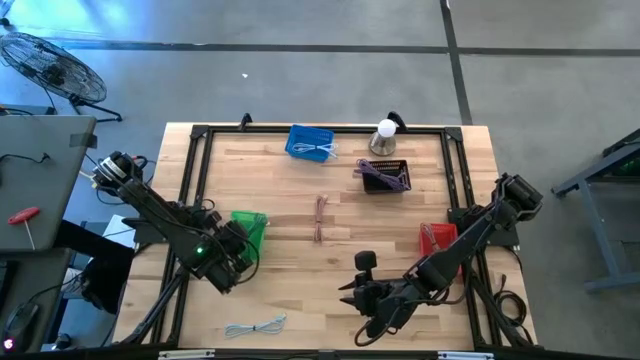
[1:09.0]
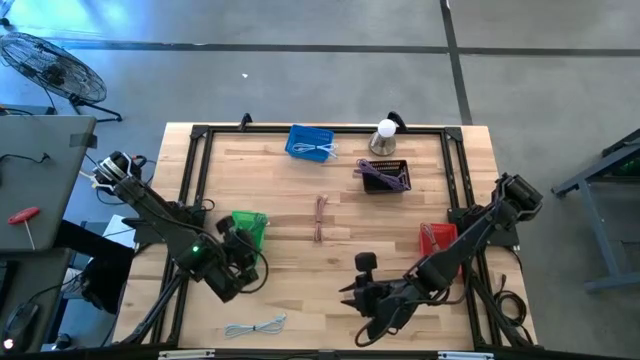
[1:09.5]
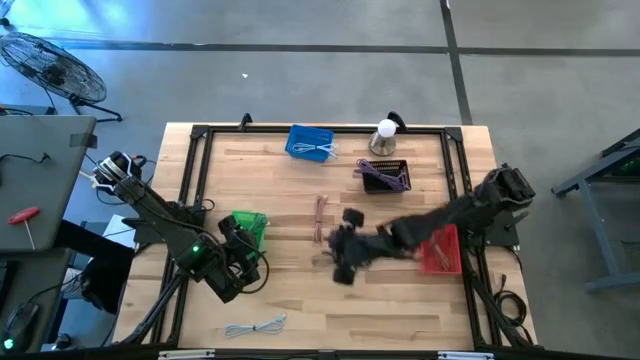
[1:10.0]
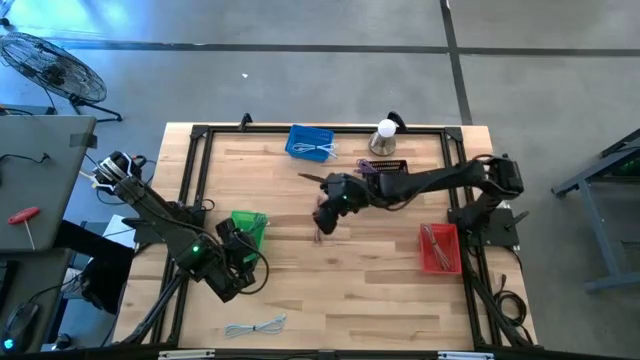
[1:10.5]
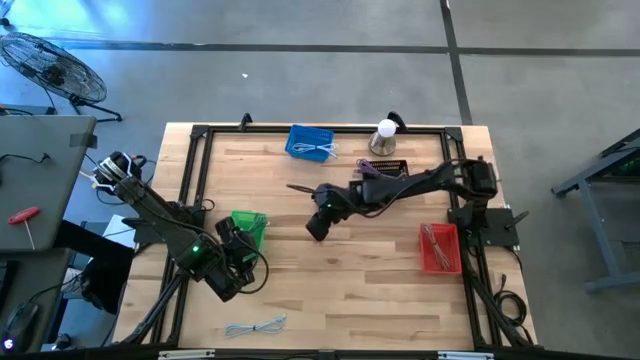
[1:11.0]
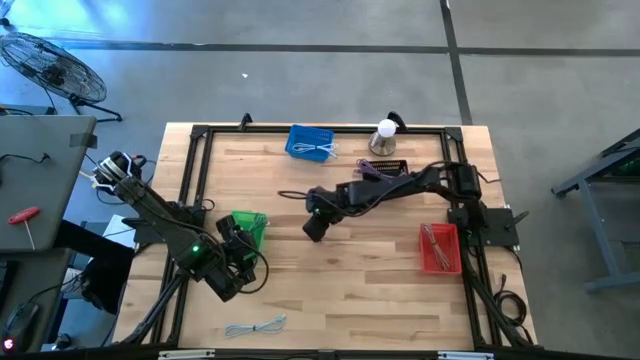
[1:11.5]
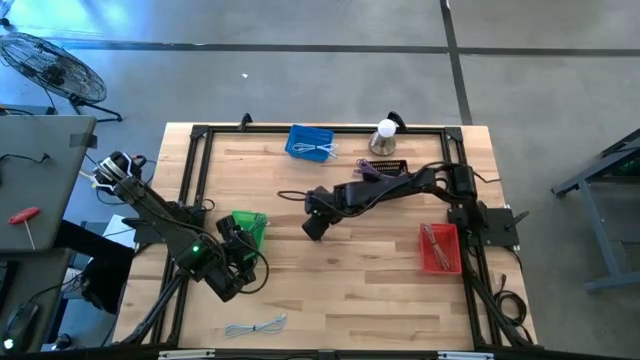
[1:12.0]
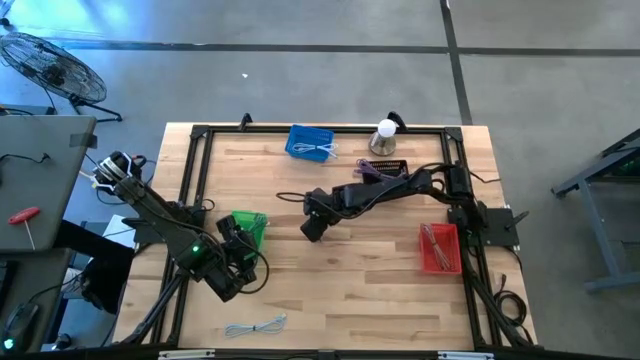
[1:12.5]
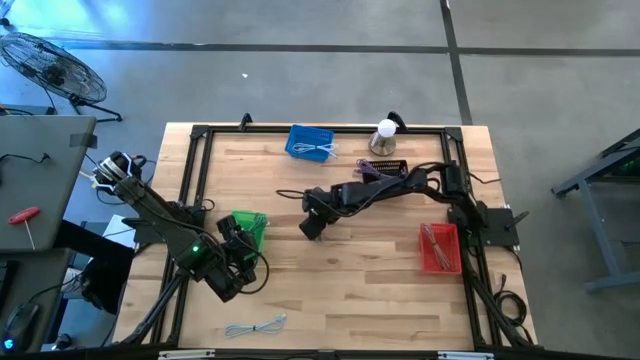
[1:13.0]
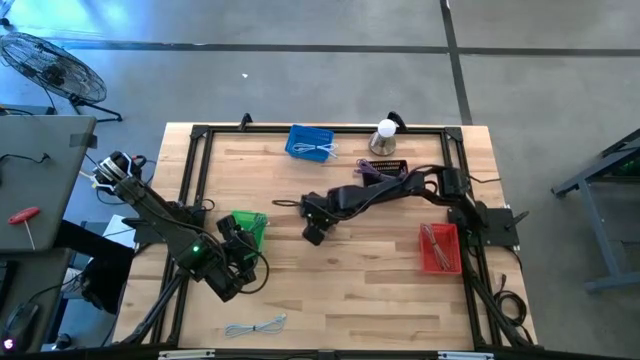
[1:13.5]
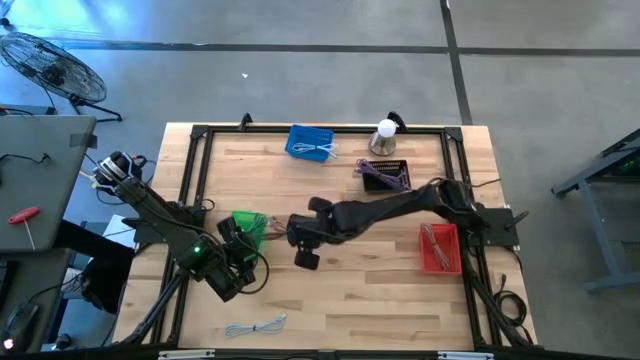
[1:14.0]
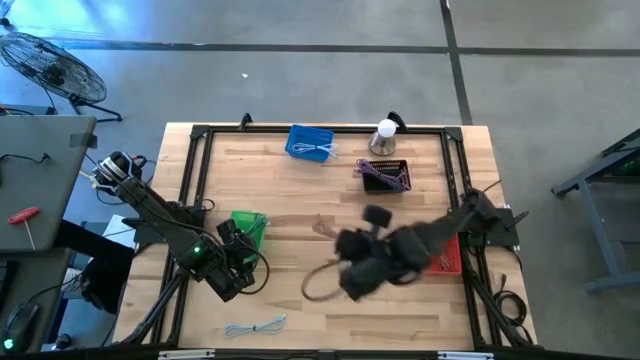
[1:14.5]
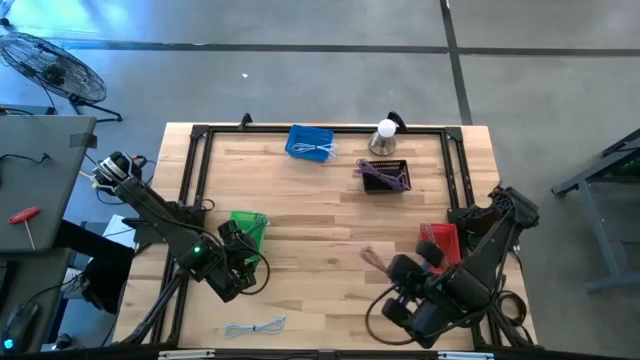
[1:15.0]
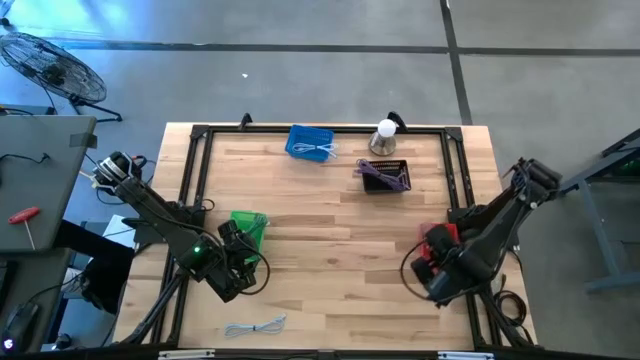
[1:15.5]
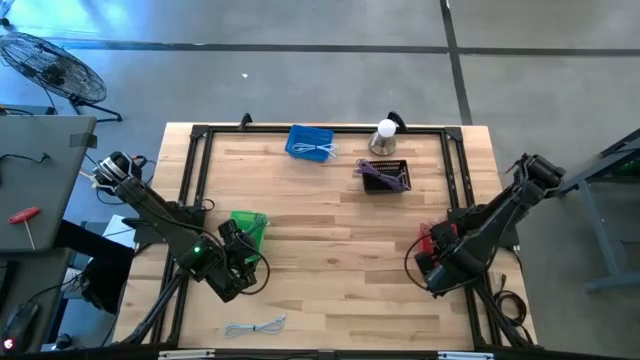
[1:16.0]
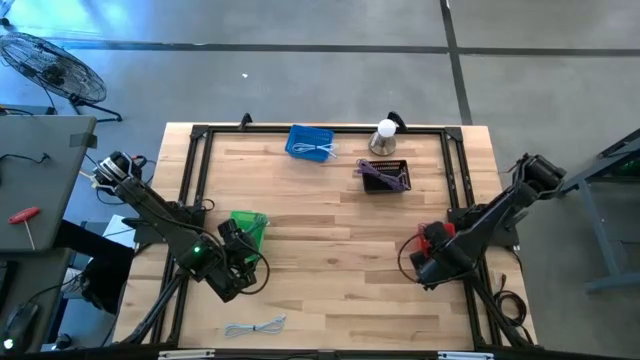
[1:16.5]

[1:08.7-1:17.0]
Task: Pick & Place USB Port
Put the pink charger cable into the red bin

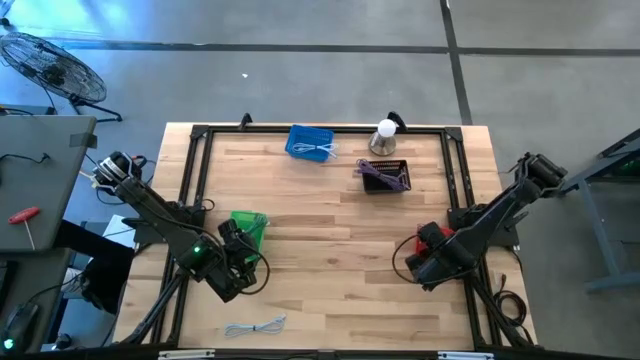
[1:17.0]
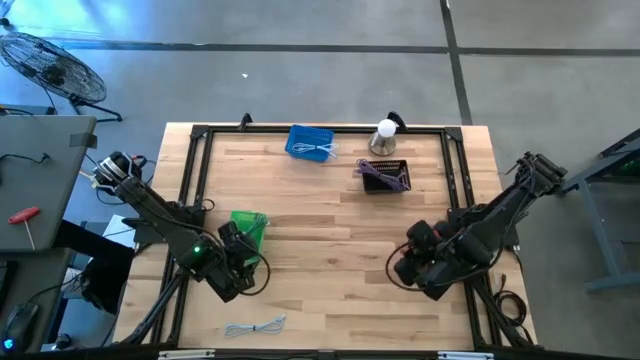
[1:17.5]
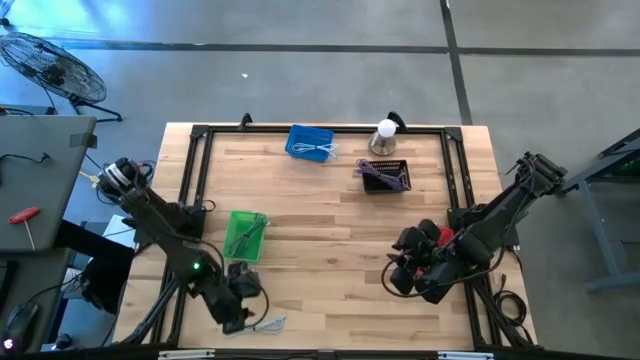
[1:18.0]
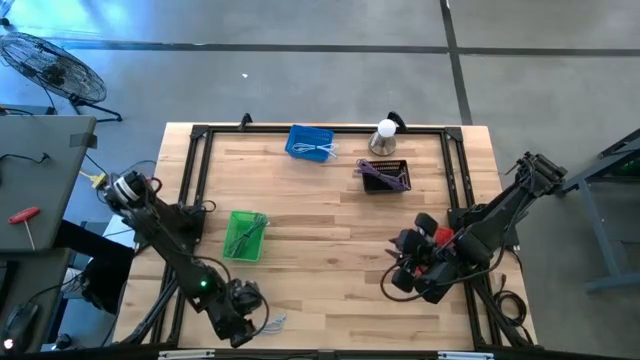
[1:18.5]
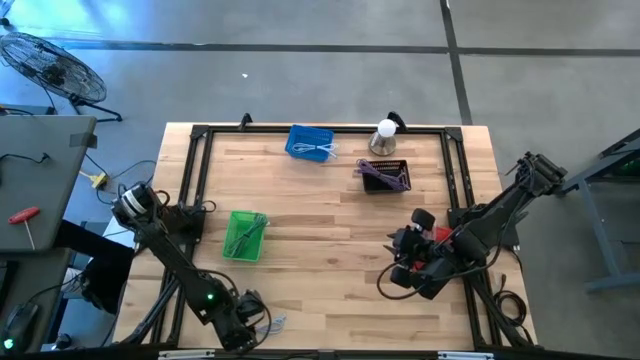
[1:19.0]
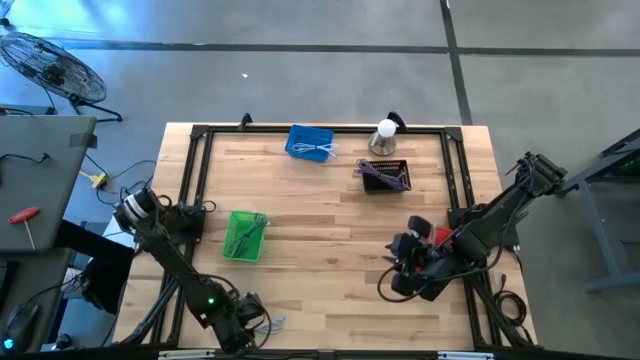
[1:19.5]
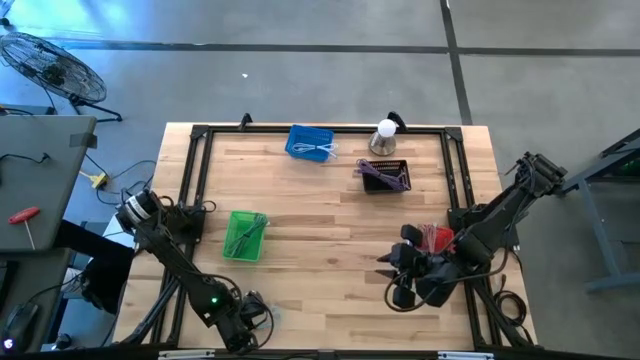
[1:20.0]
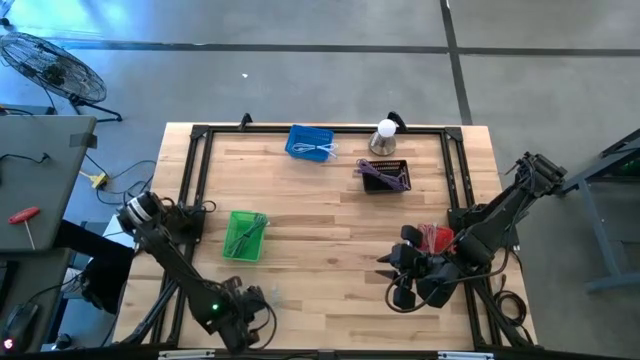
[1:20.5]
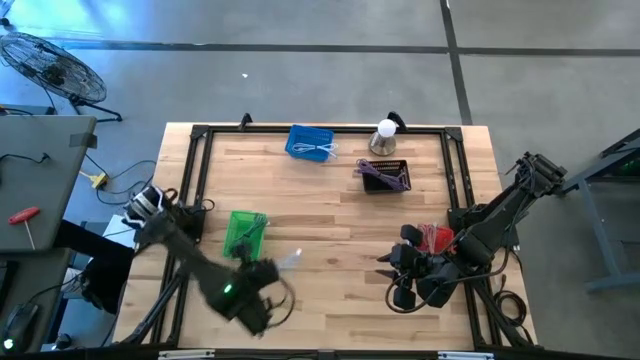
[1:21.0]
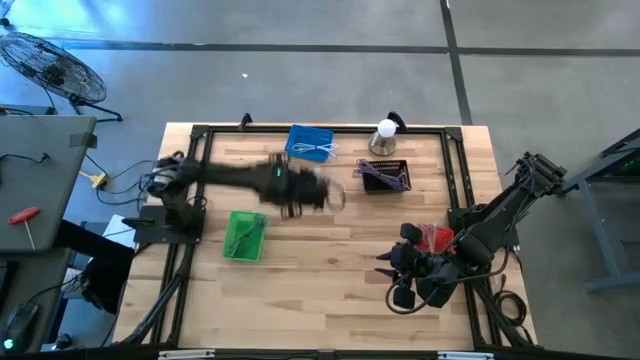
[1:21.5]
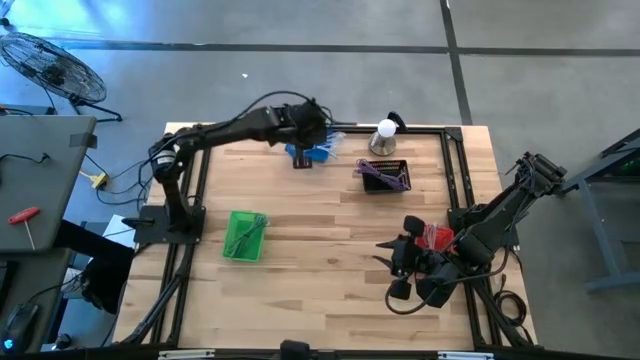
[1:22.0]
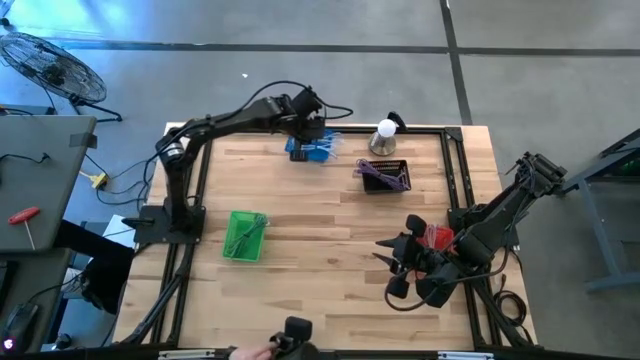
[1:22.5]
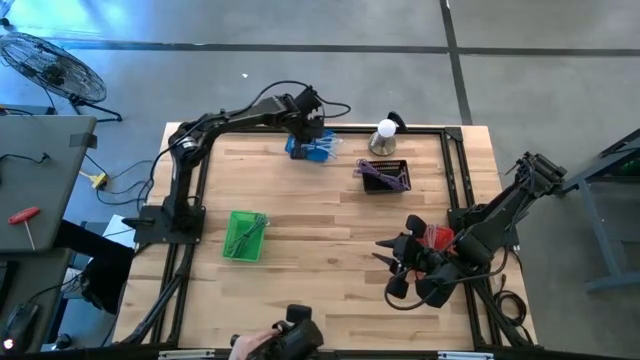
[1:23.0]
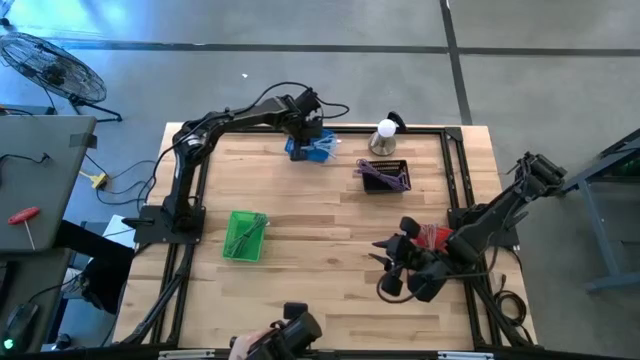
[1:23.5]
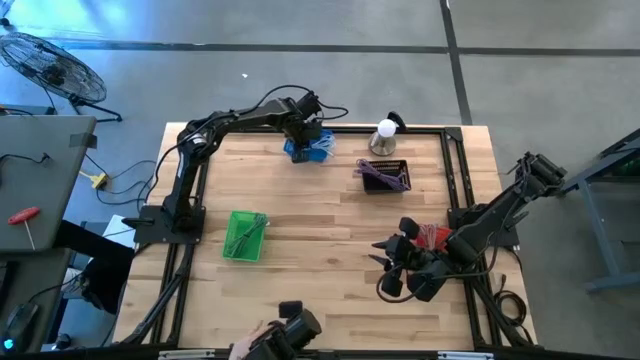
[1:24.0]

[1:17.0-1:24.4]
Put the light blue charger cable into the blue bin

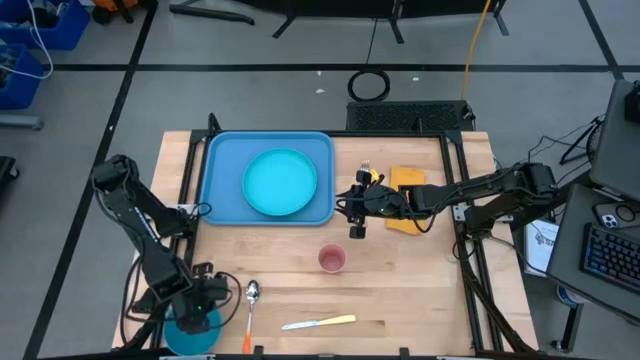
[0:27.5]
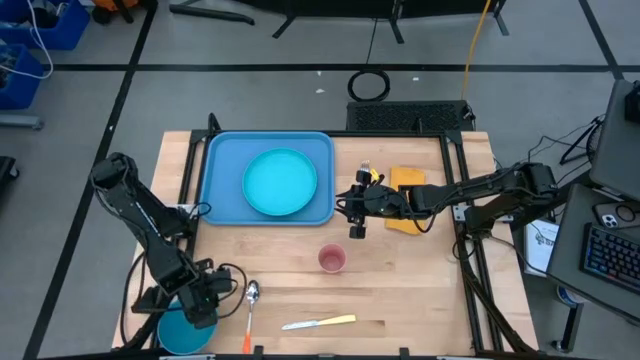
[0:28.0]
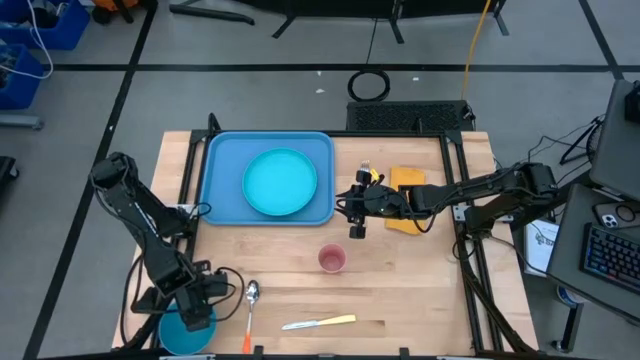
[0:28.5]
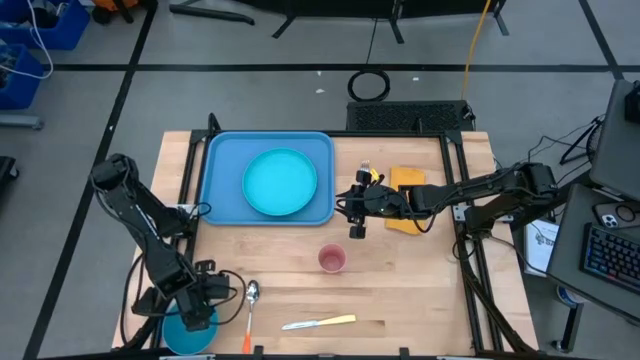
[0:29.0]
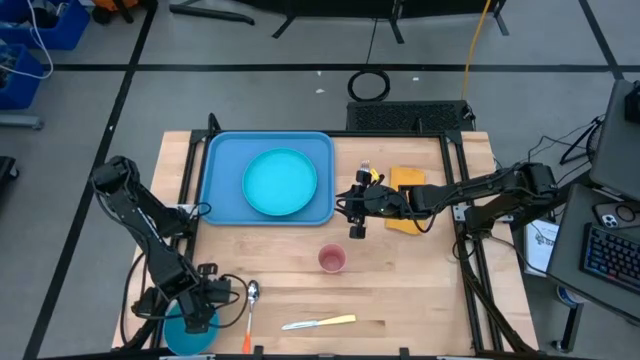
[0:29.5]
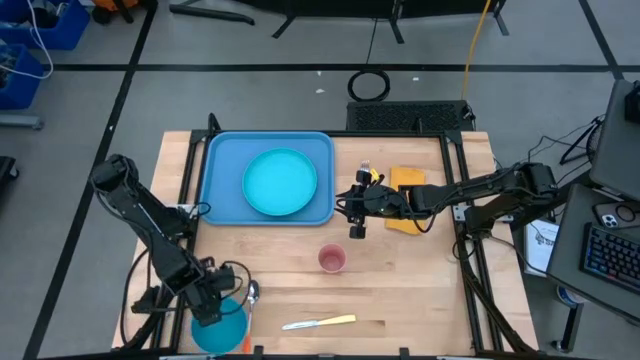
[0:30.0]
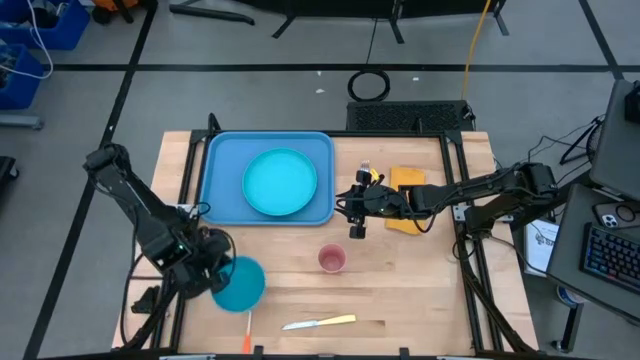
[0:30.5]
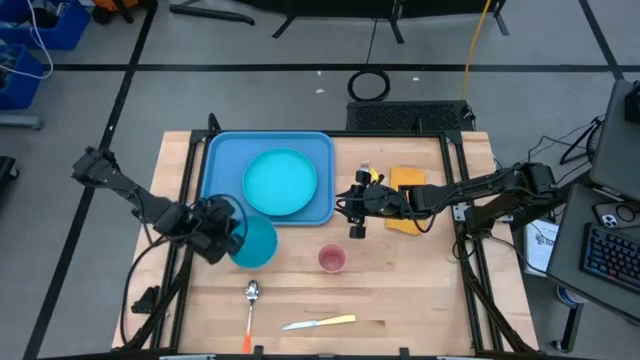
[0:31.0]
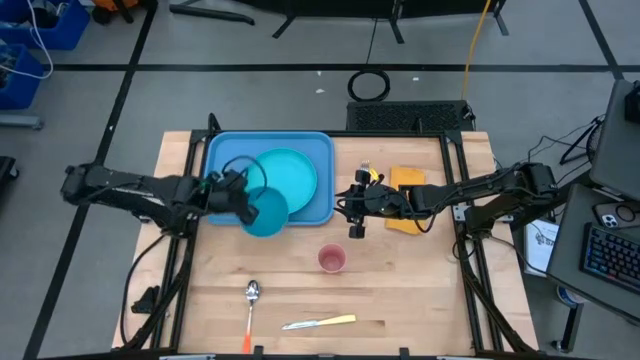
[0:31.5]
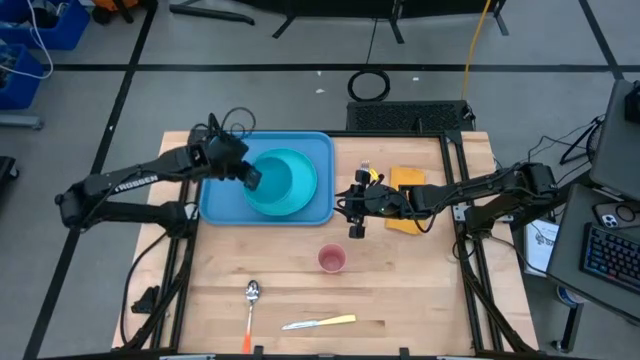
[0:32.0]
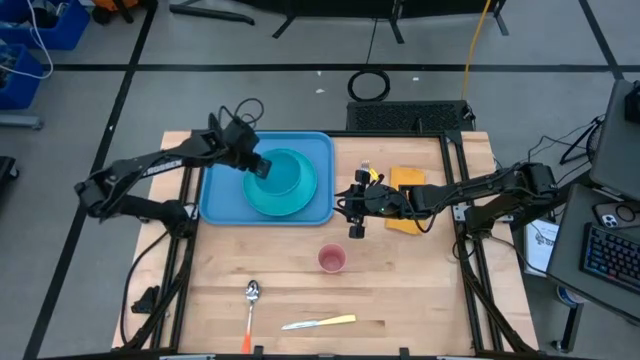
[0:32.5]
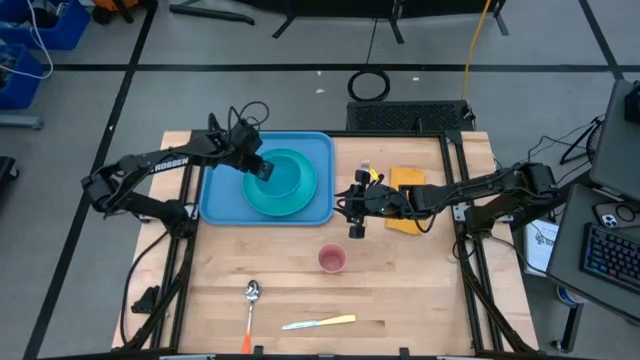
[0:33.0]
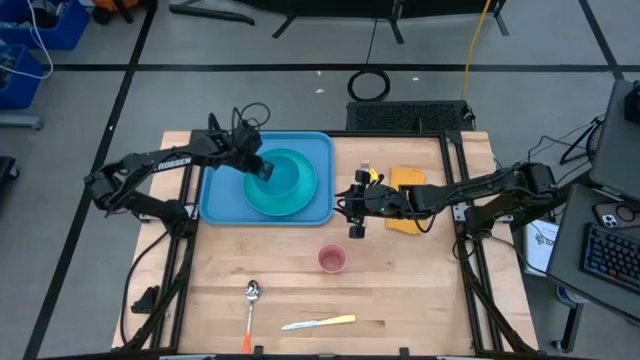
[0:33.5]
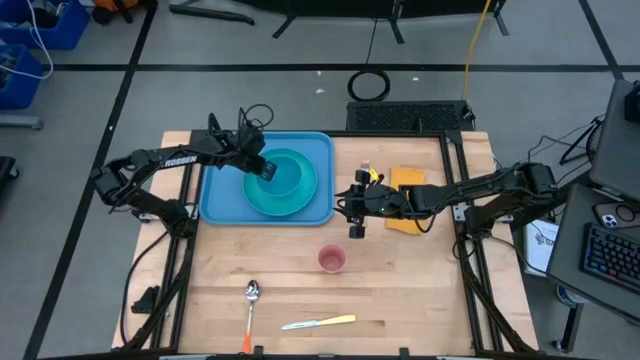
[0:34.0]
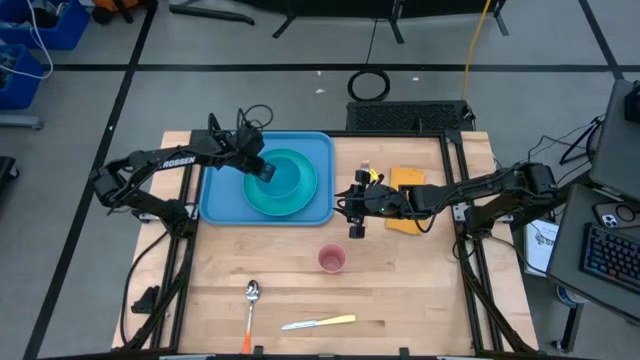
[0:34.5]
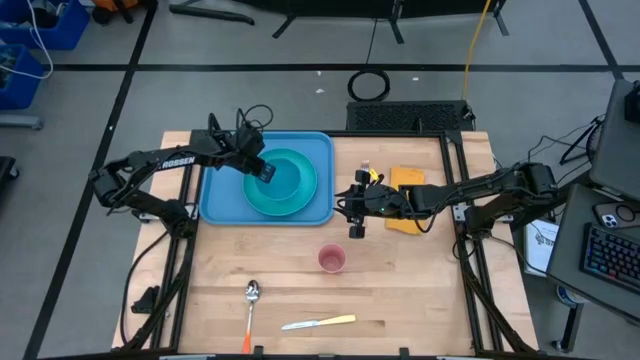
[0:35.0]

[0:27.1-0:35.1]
Task: Set up tray
Put the blue bowl on the green plate on the blue serving tray
